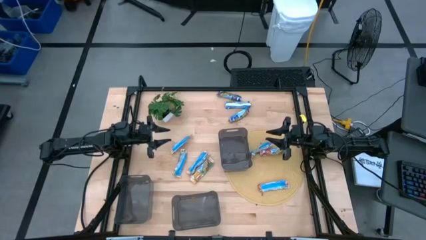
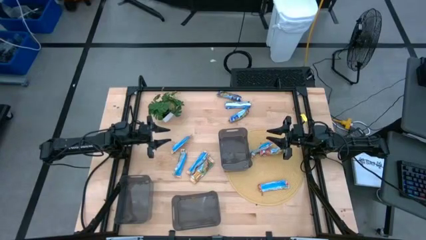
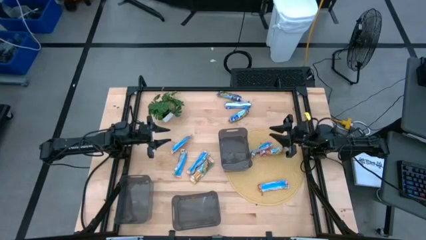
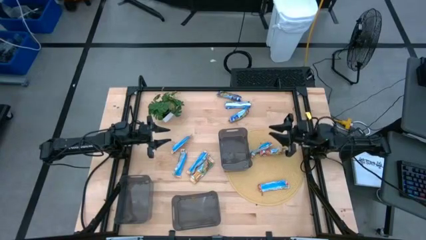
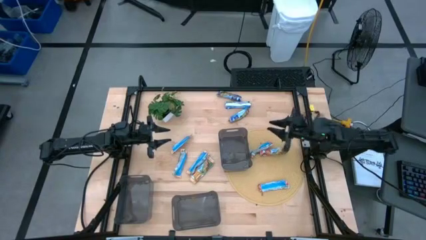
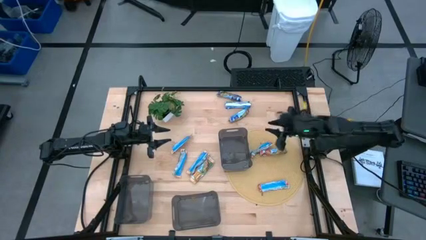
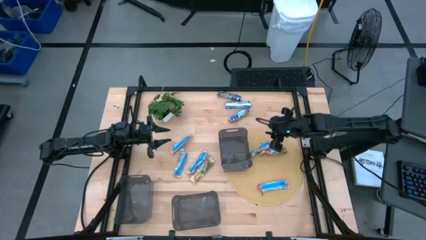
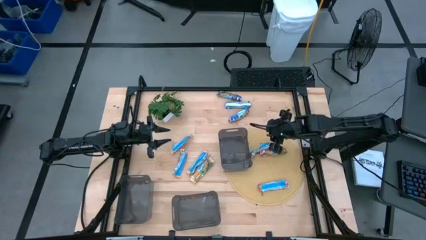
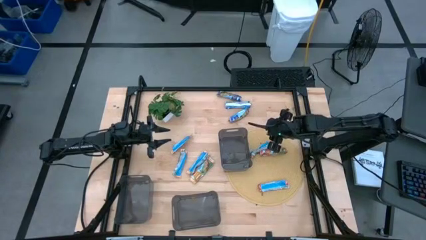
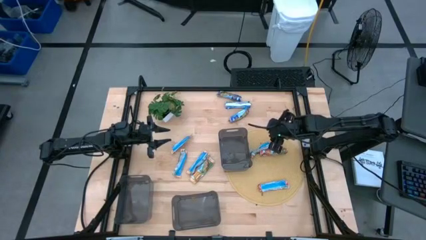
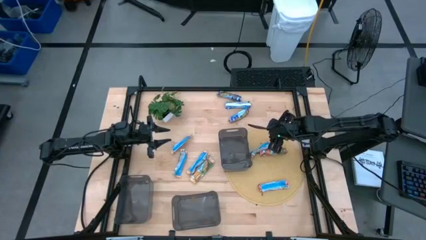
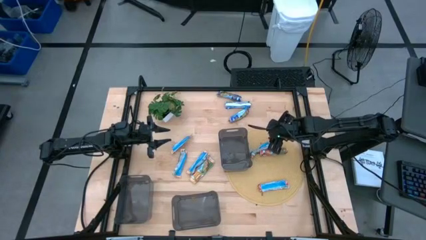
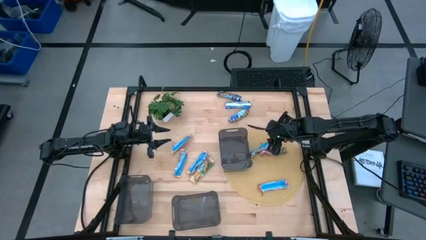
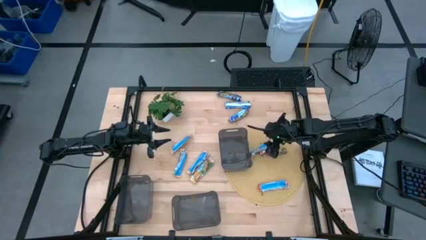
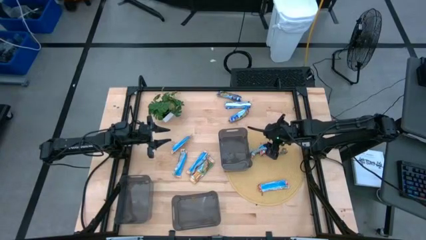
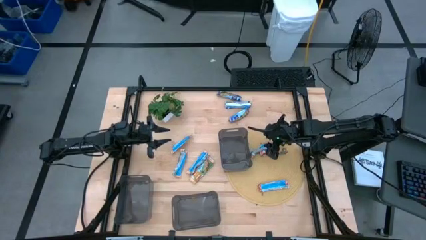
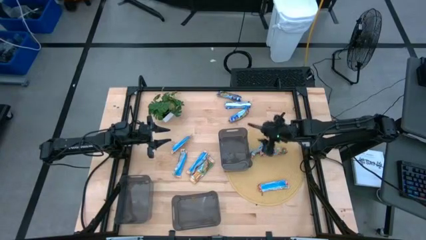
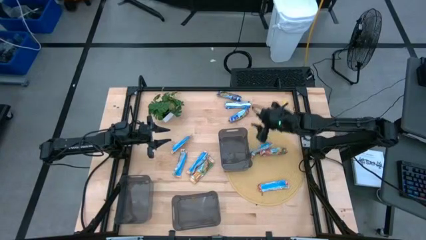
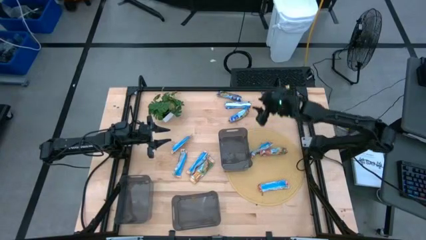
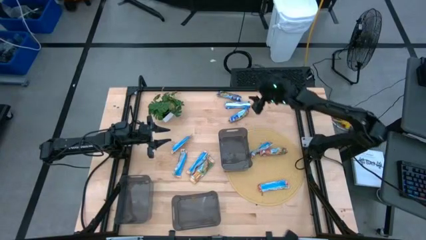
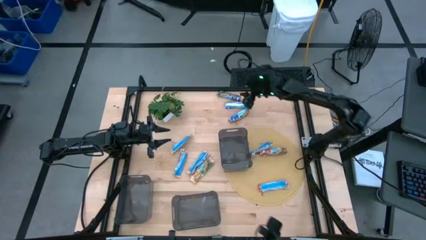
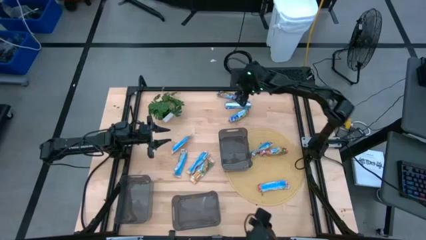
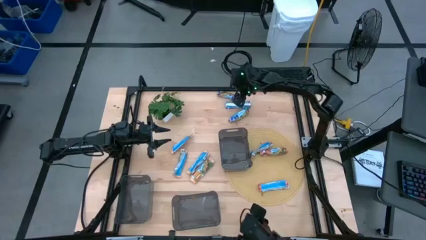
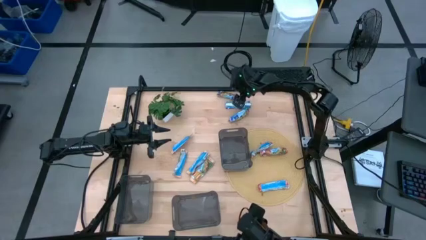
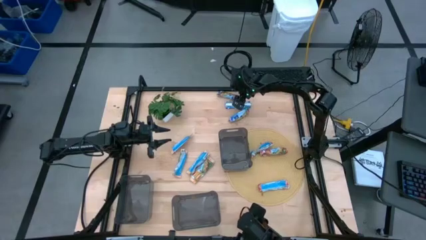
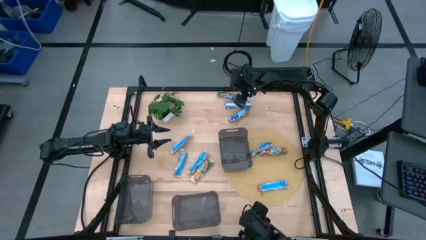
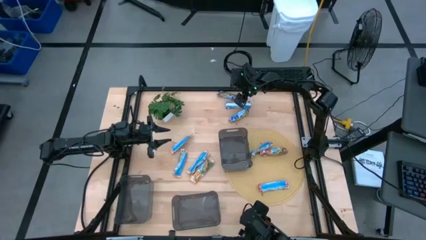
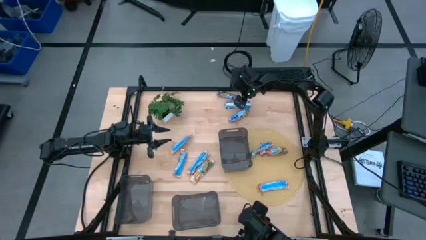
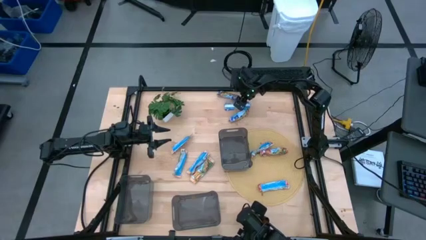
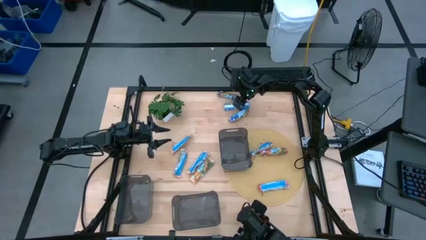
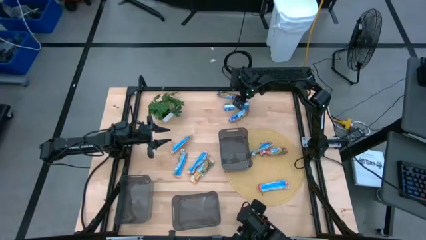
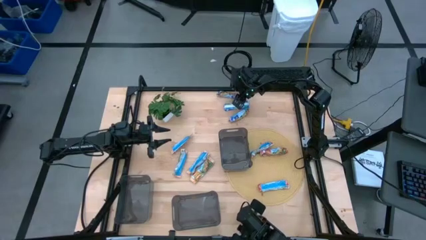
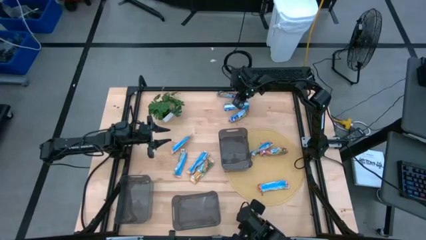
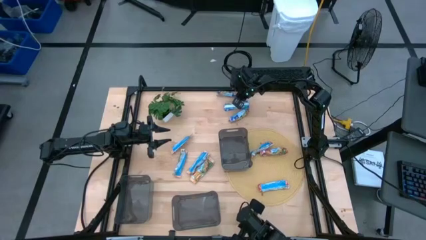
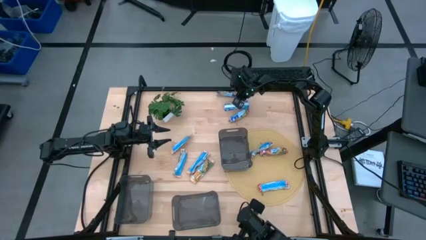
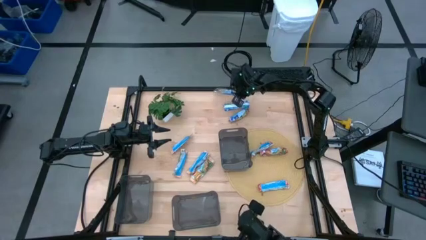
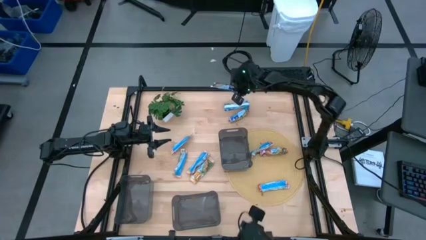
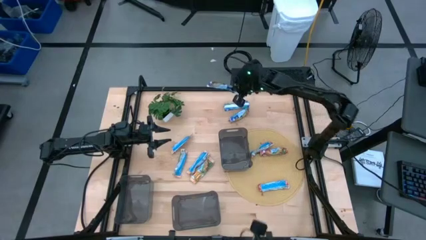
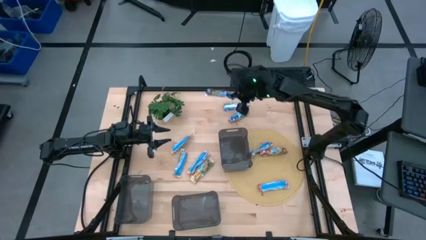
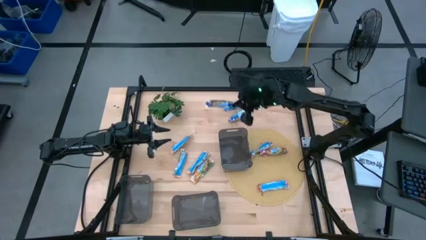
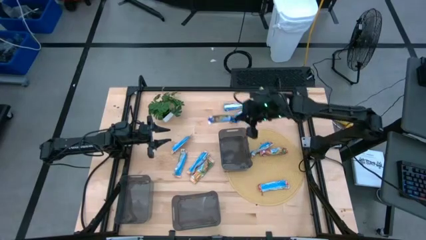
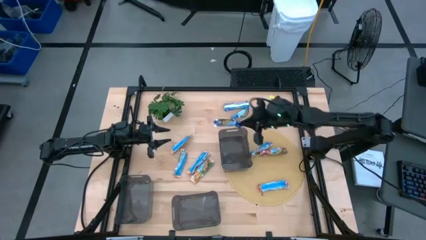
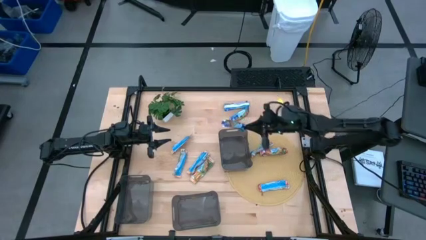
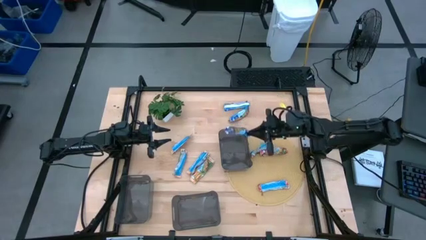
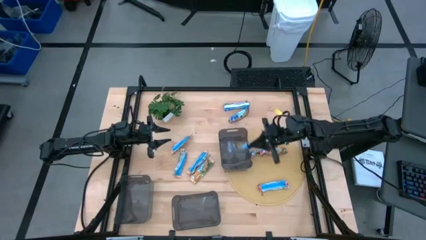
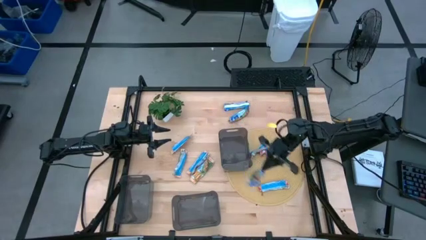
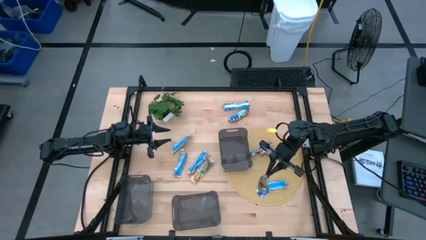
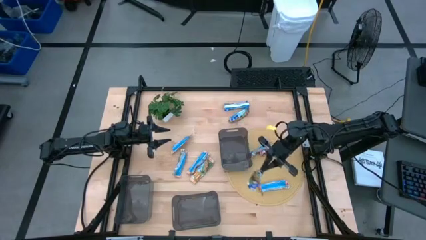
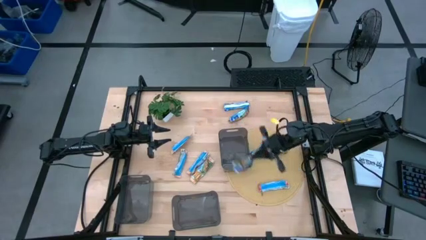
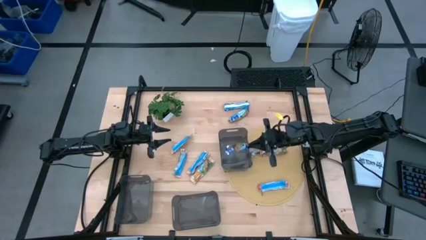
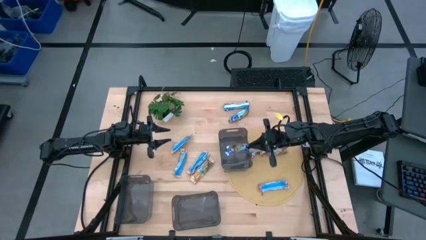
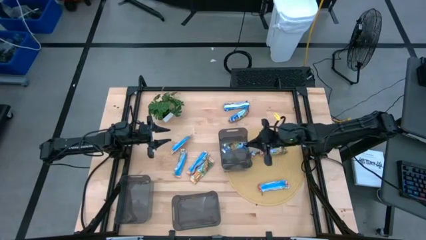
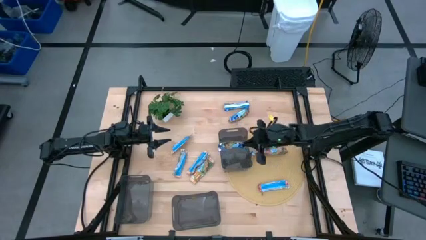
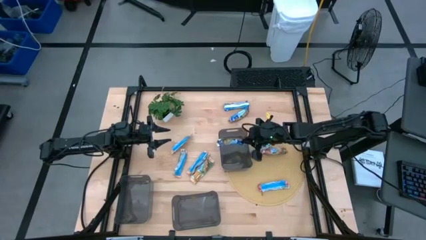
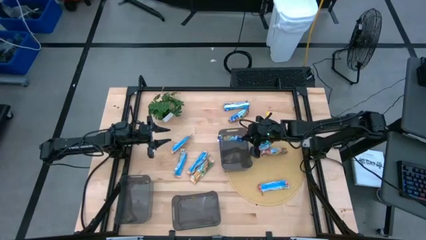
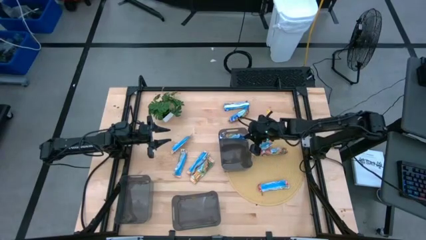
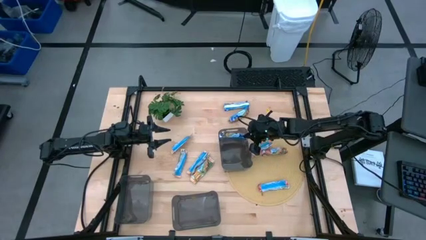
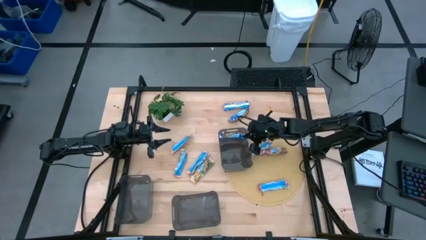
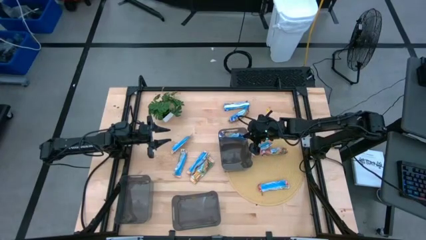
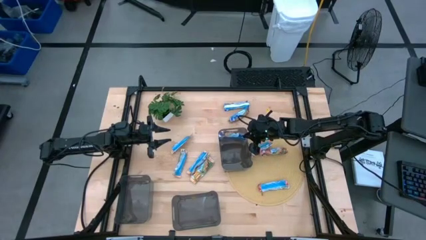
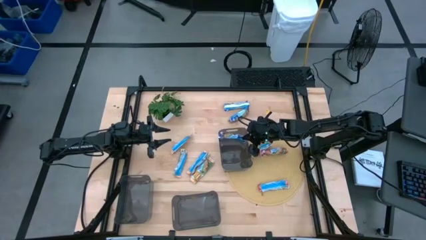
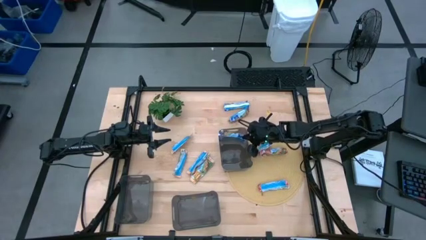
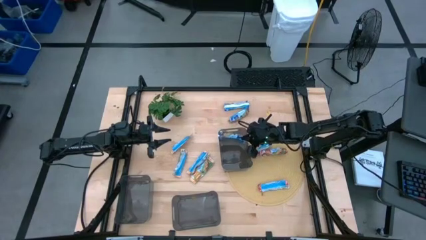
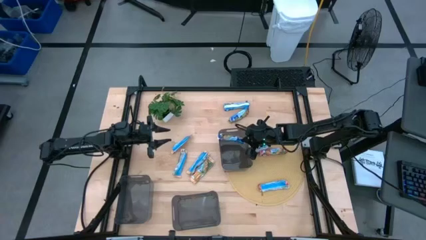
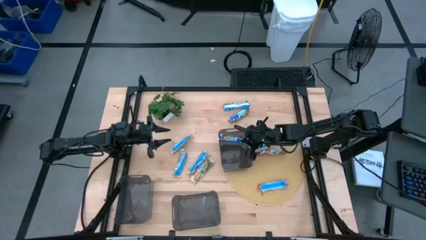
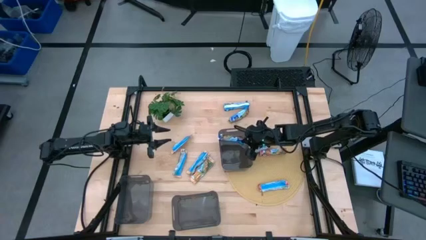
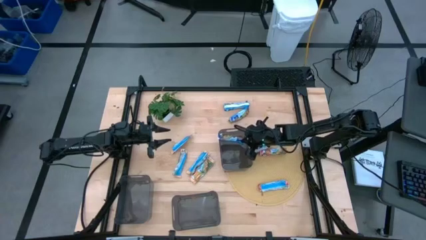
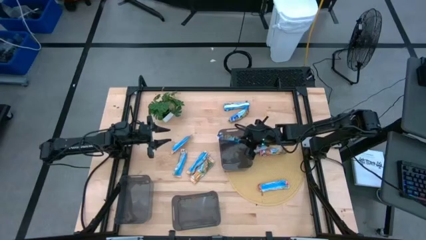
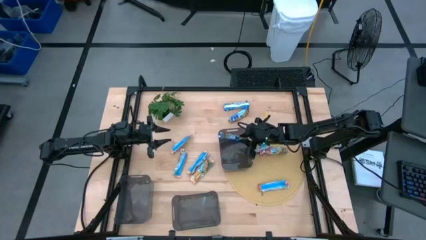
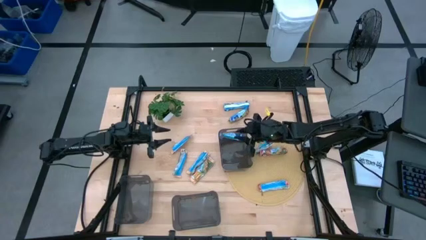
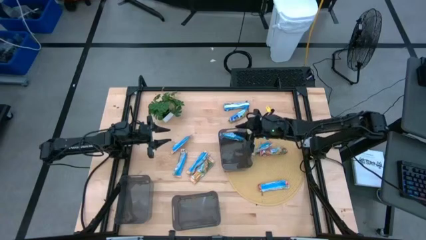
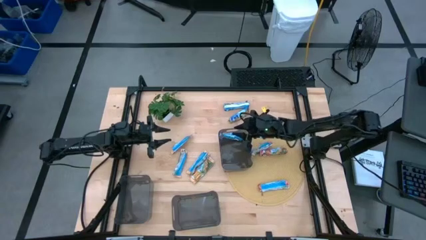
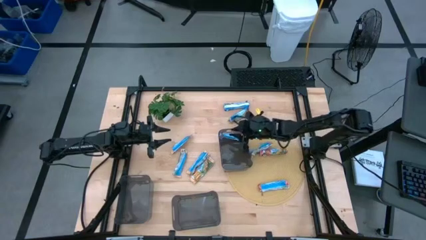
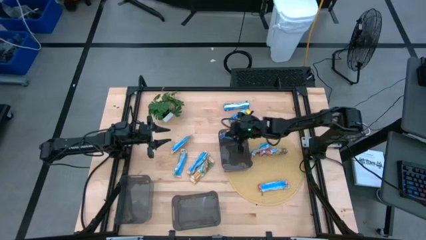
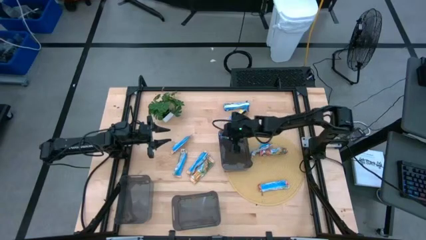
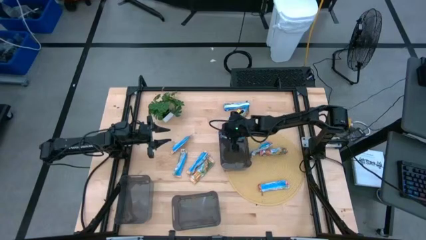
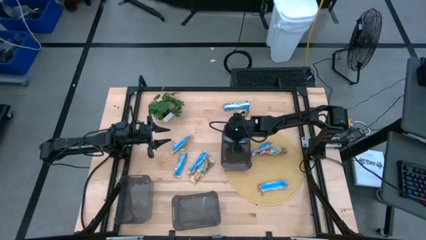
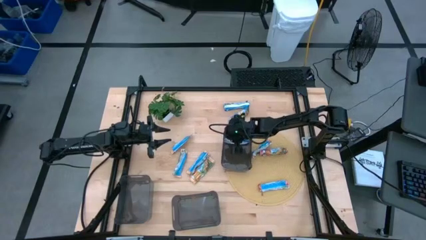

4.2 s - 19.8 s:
Task: Pick and place Granola Bars by type
Put the top blue granola bar into the top right black bin
